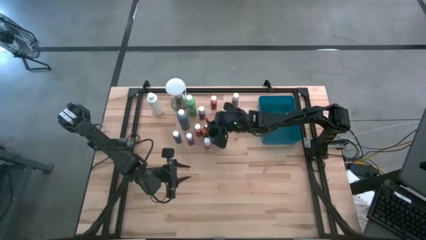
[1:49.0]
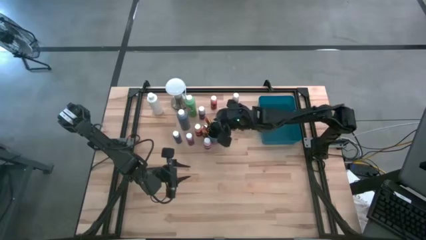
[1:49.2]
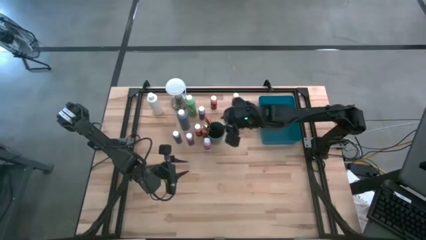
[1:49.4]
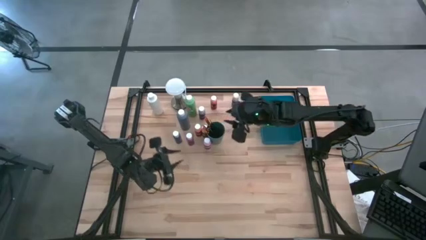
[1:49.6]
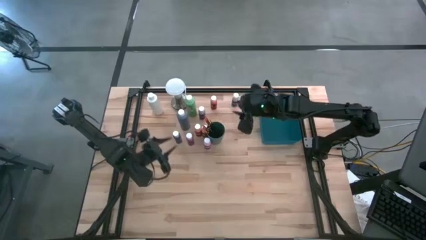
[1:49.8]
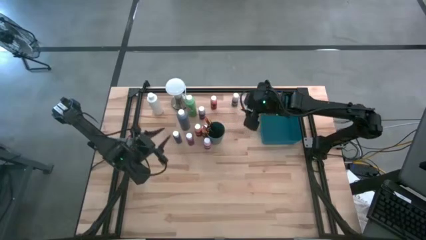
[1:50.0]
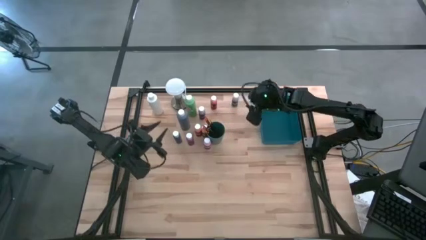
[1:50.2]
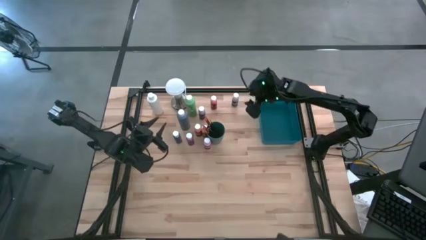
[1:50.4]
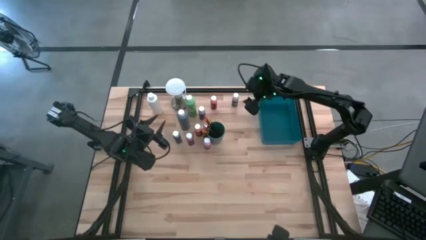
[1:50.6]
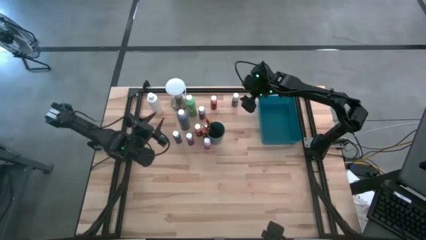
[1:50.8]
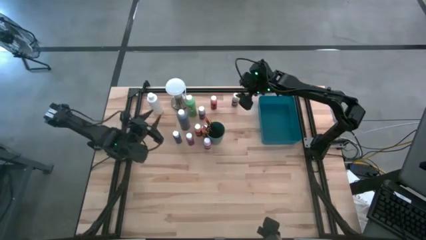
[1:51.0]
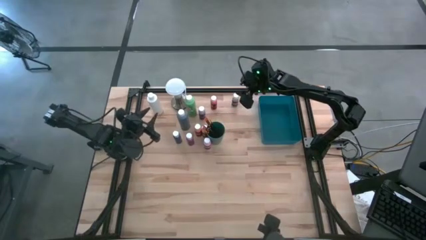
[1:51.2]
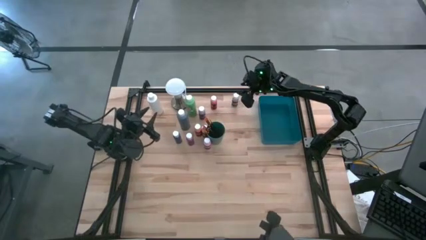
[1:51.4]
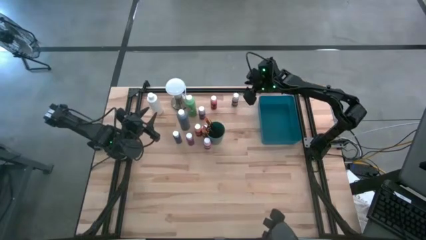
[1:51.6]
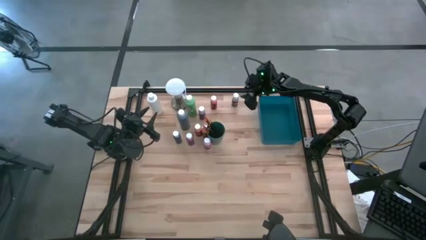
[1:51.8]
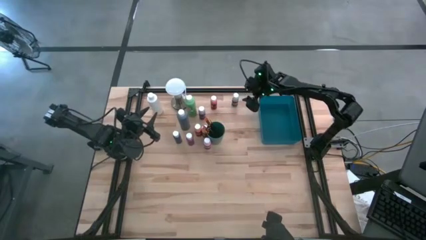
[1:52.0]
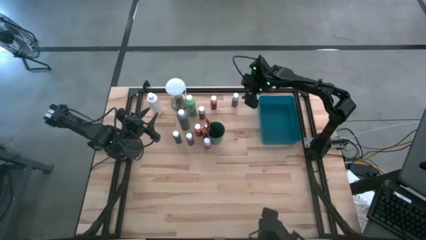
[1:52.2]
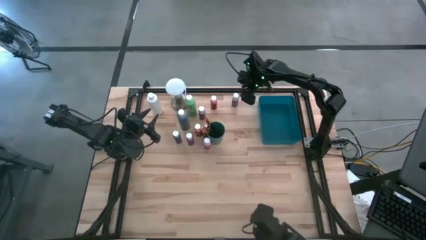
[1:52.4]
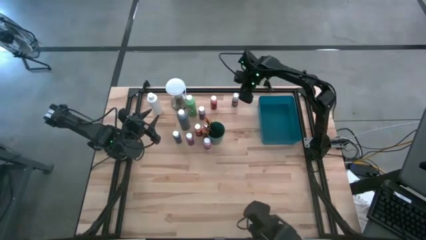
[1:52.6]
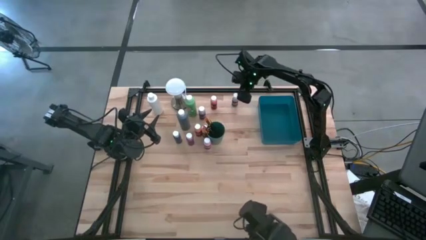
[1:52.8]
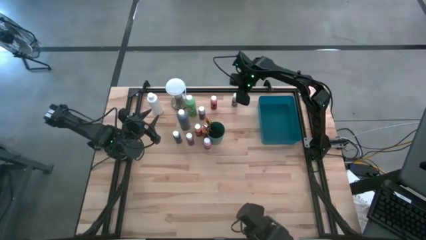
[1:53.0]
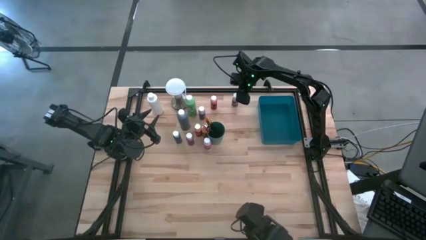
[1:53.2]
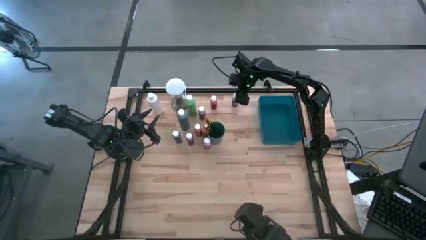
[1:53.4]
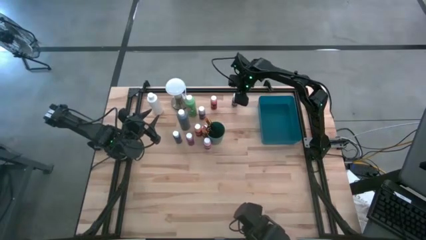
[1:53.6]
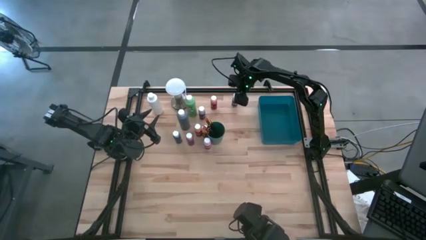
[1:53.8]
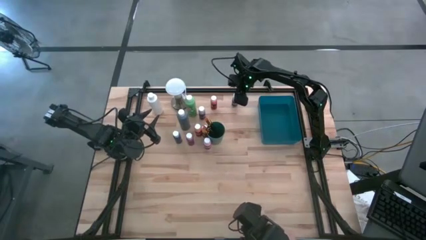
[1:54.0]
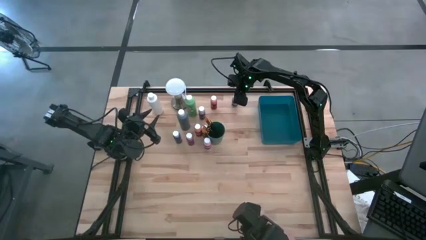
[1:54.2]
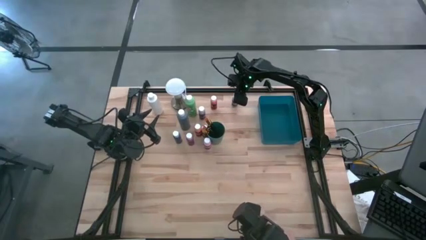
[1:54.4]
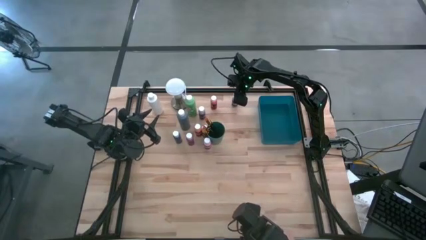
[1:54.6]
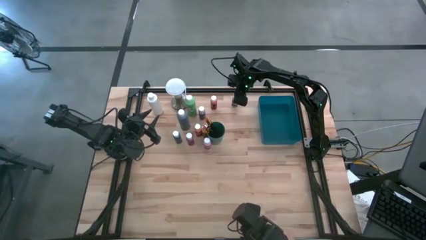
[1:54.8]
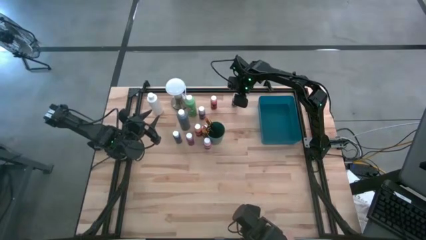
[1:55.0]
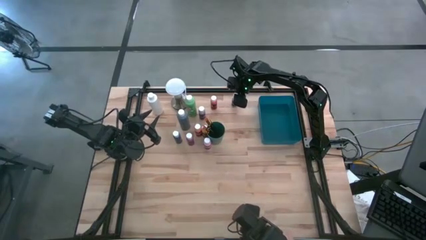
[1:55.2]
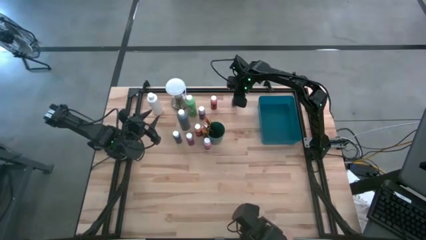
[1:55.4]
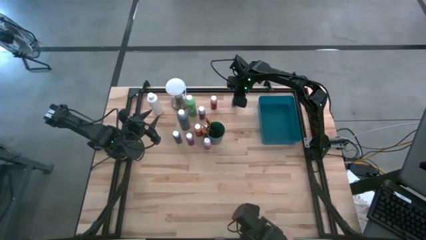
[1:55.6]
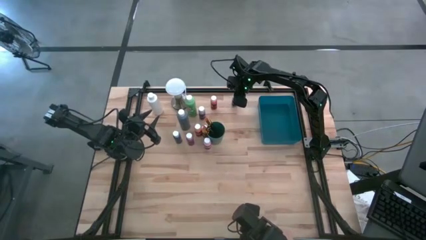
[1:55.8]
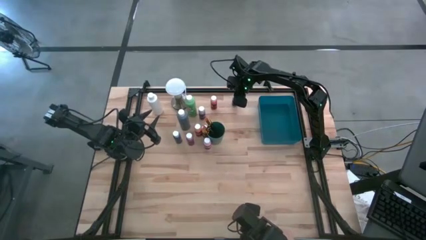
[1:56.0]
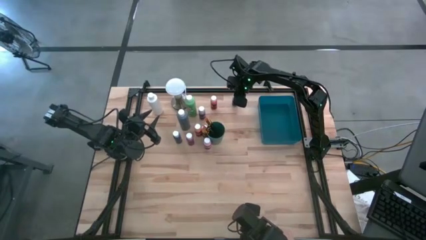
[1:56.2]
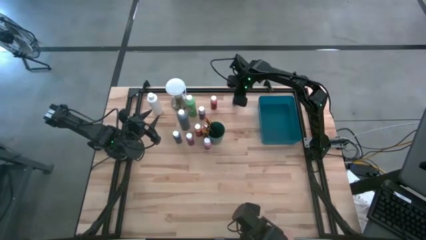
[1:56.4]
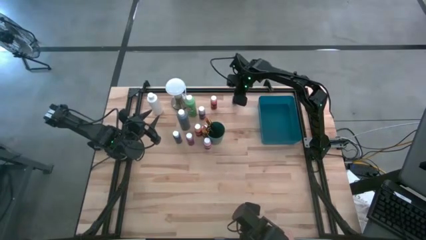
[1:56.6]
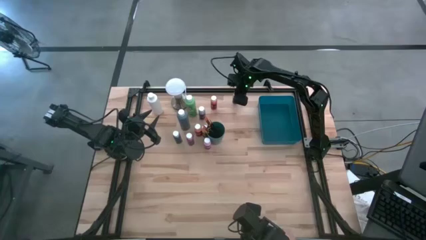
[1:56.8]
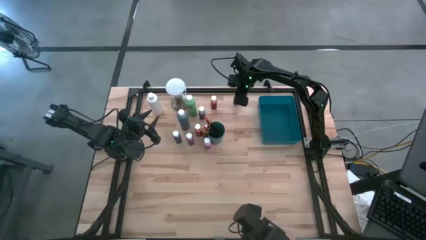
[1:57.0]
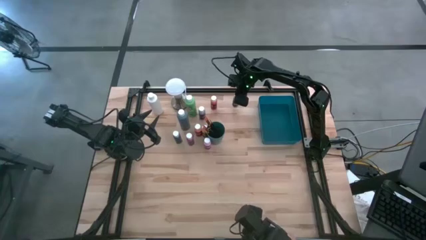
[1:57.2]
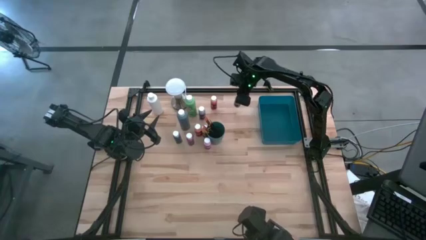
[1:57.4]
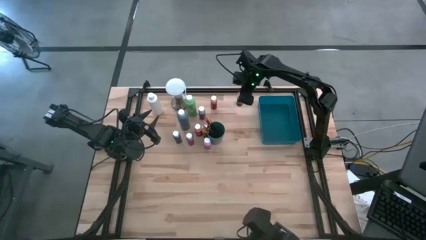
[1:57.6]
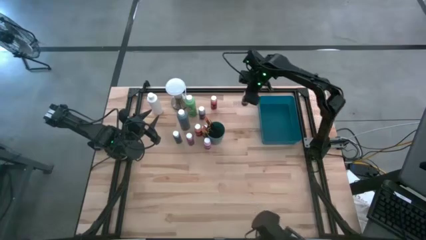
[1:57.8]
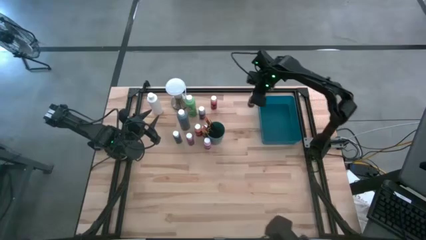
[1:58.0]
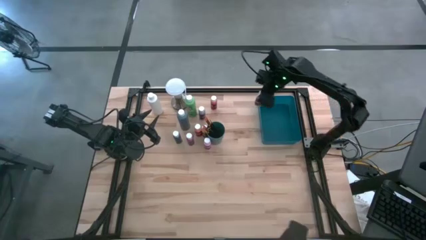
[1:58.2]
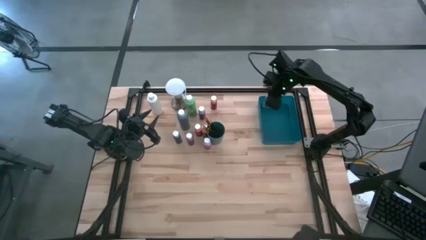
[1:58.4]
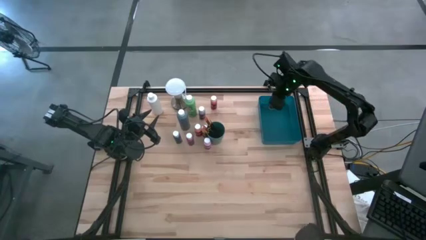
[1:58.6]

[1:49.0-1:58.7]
Task: Pick & Place Paint Supplies
Put the gray paint bottle into blue bin

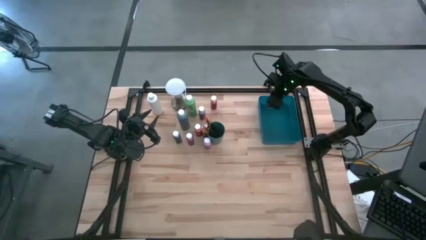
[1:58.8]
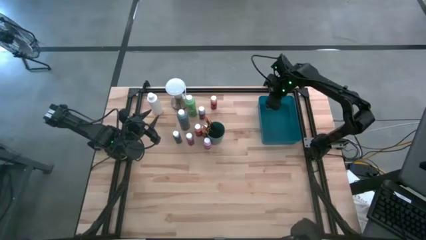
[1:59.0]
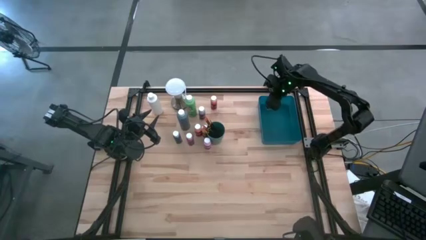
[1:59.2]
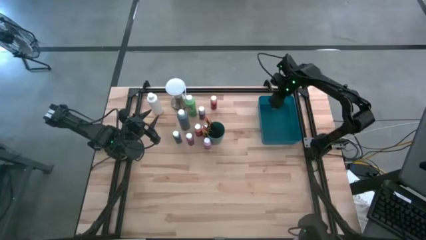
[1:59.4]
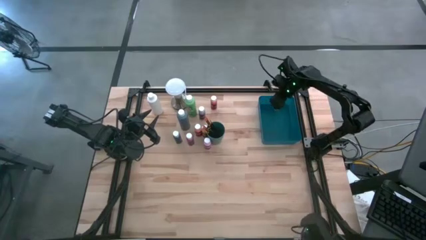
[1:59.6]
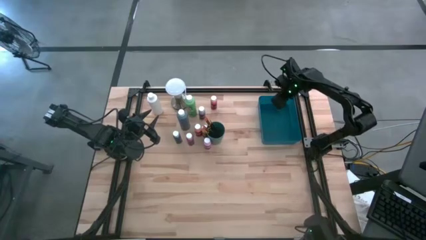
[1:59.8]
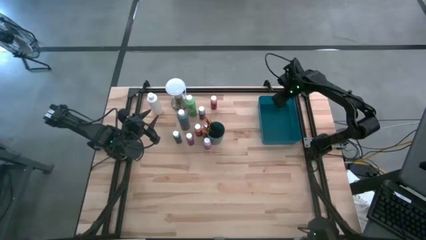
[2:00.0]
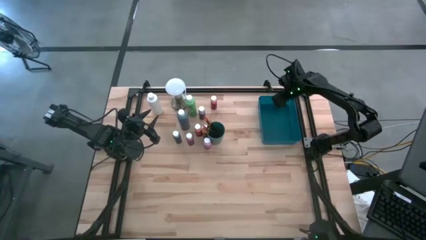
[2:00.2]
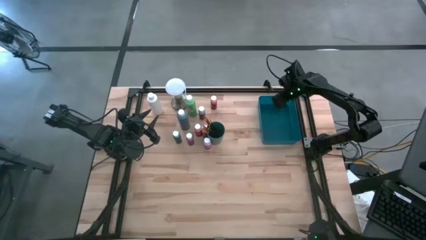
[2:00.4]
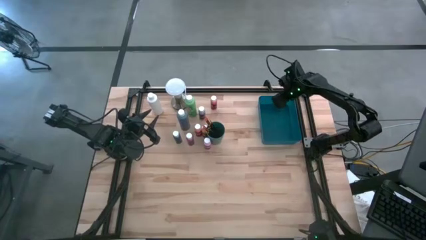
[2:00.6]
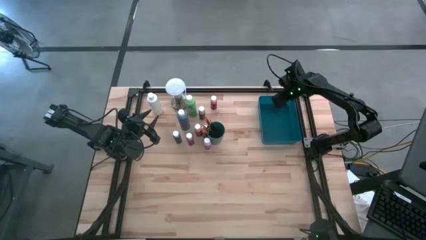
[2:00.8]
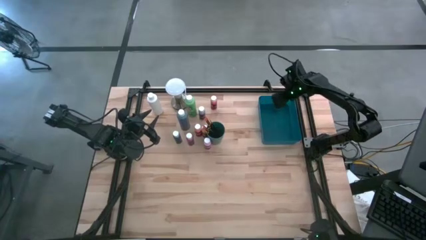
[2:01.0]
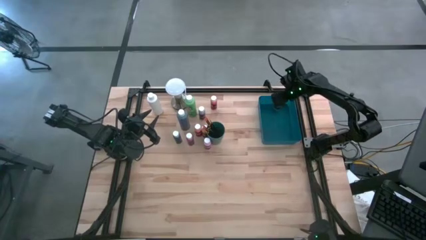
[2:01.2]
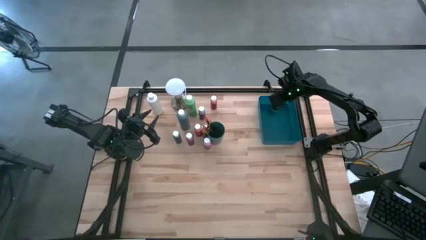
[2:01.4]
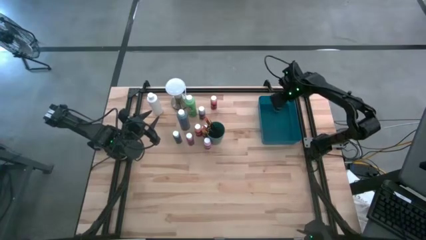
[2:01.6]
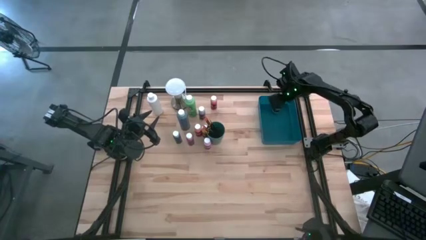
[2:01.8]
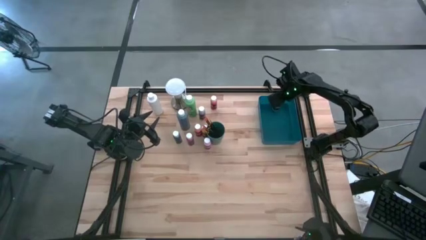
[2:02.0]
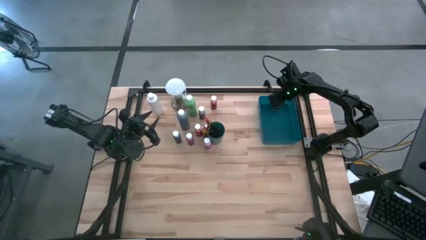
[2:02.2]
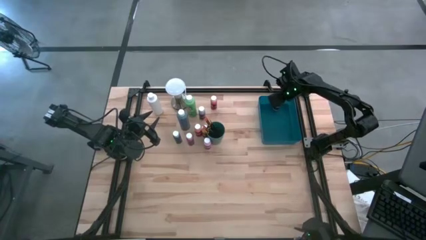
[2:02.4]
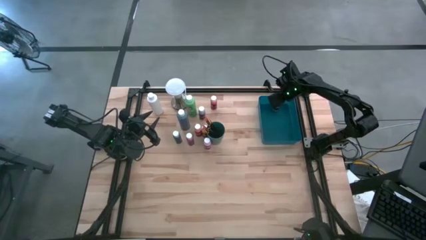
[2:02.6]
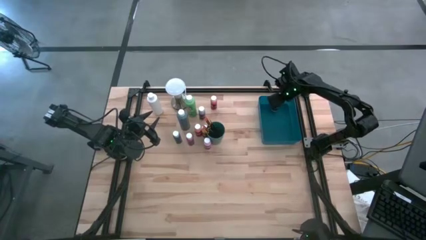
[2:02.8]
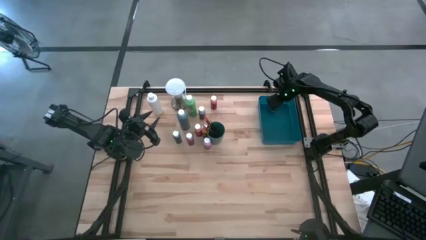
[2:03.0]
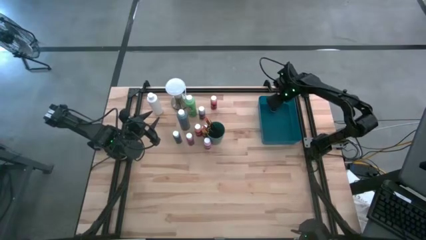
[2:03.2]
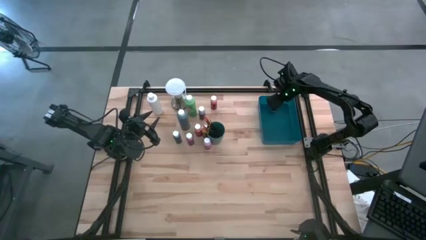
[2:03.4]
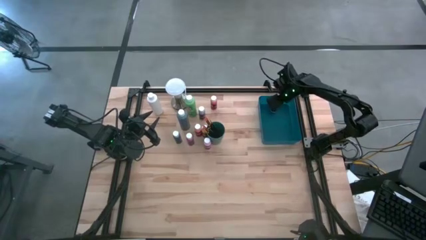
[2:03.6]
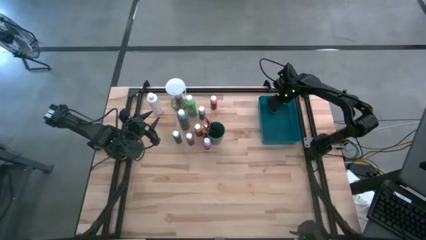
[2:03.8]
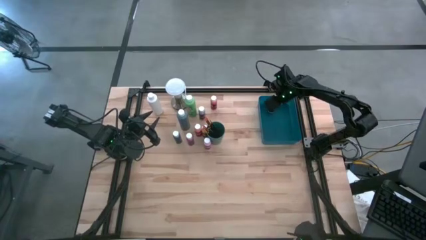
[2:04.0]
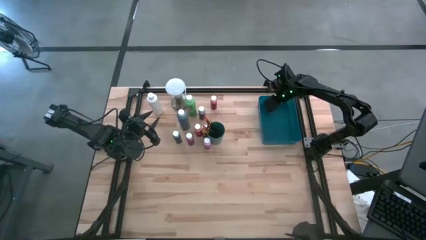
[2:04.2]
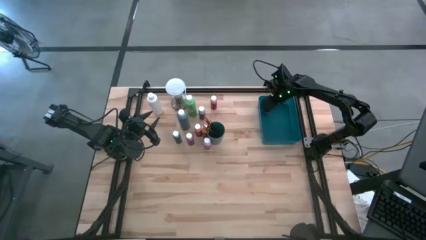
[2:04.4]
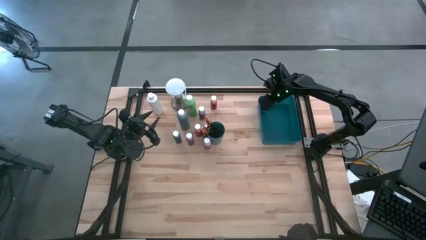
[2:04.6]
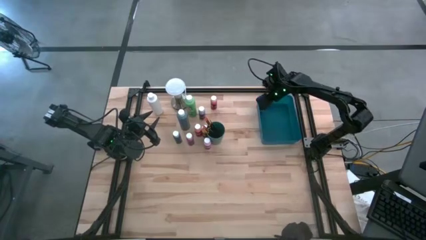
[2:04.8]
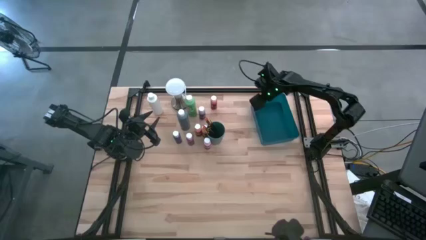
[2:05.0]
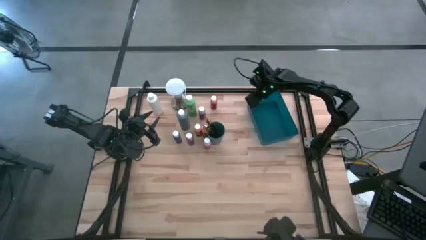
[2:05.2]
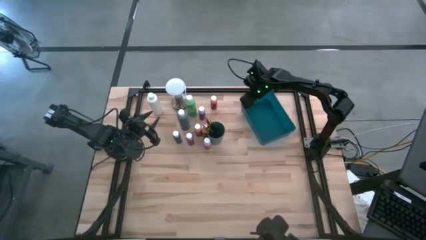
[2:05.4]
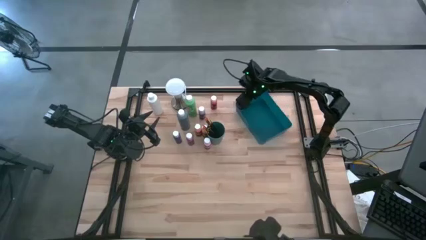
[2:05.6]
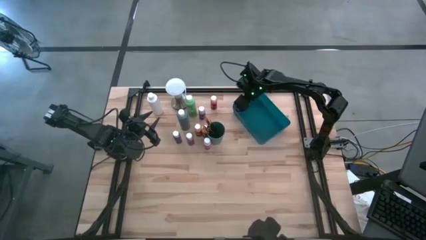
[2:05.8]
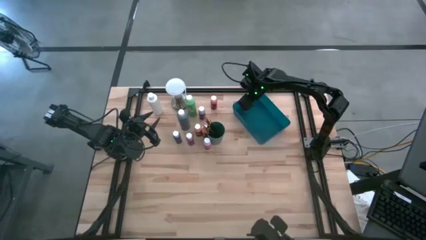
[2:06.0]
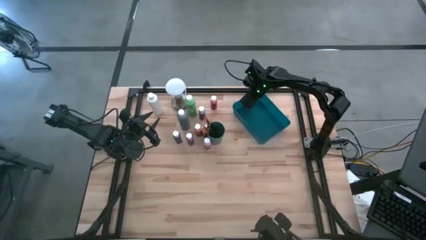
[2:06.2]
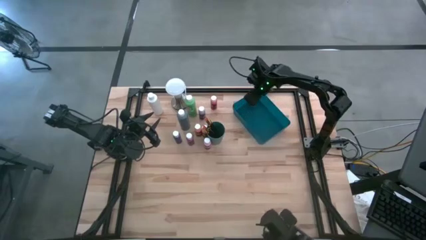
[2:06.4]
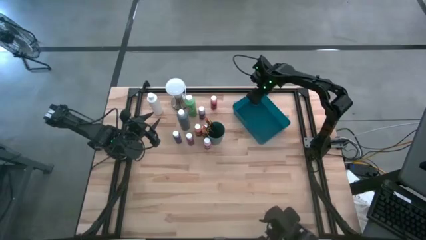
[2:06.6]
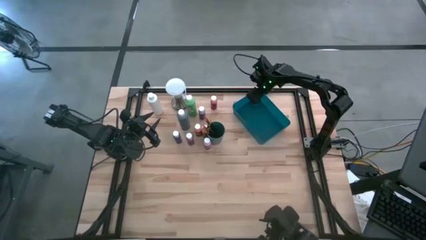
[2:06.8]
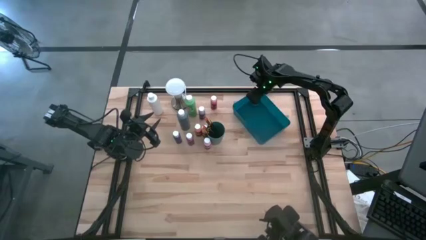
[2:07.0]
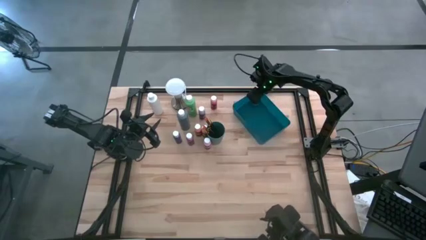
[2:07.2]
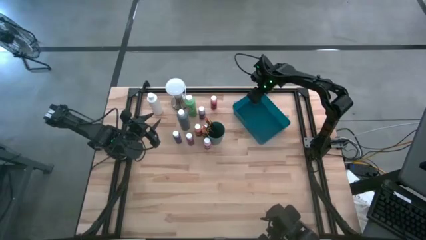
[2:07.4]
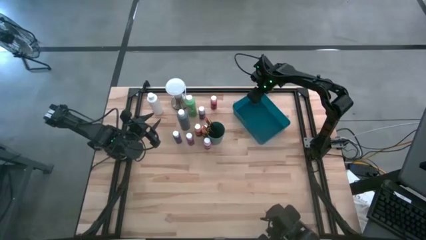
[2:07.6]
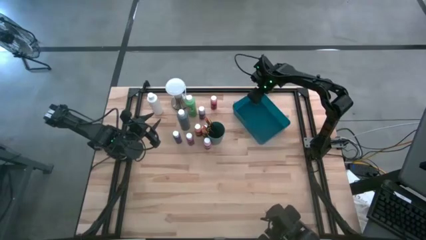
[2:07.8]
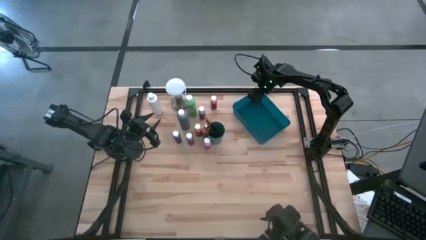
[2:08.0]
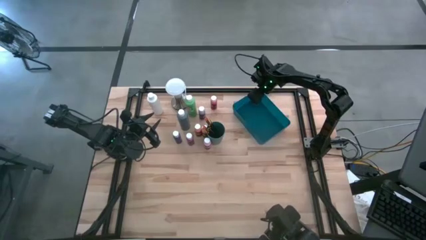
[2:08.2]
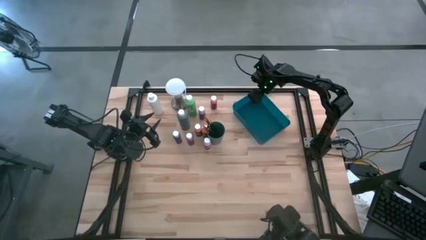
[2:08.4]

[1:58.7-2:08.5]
Put the gray paint bottle into blue bin
